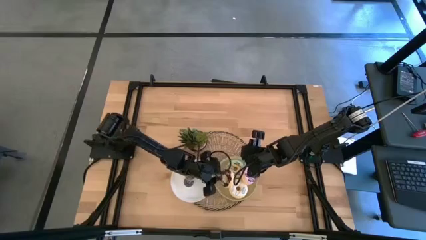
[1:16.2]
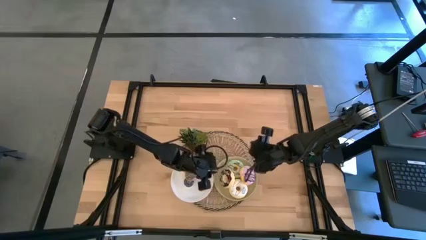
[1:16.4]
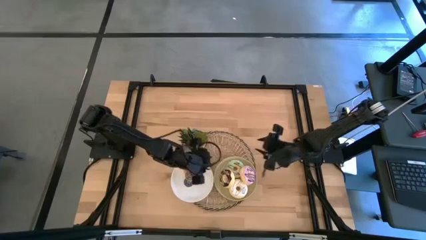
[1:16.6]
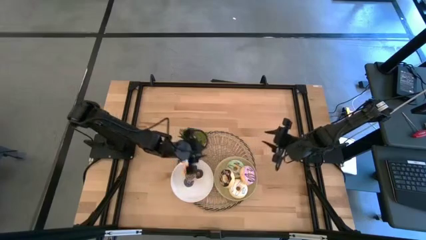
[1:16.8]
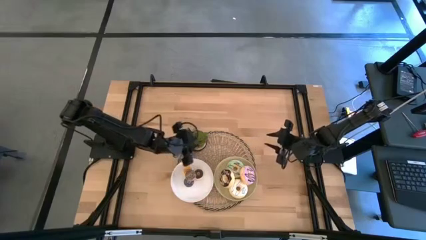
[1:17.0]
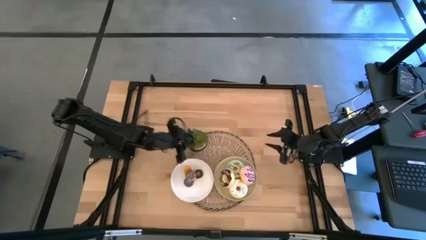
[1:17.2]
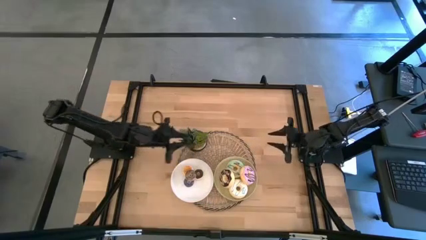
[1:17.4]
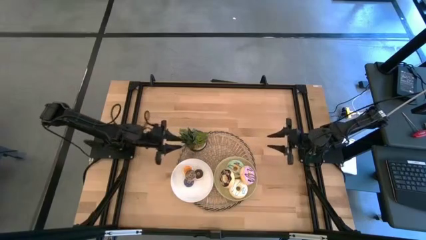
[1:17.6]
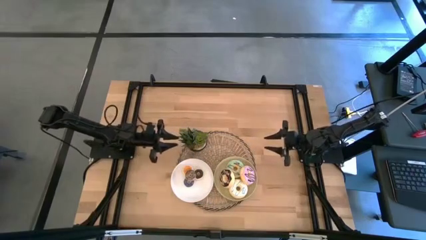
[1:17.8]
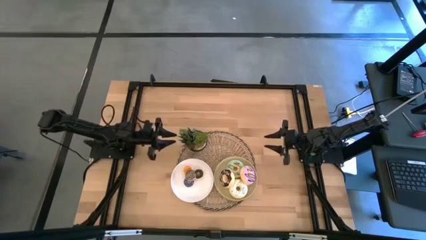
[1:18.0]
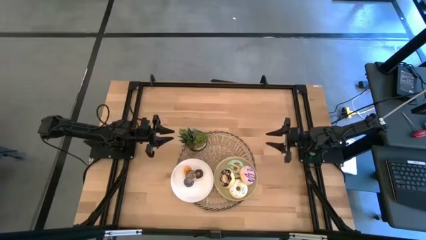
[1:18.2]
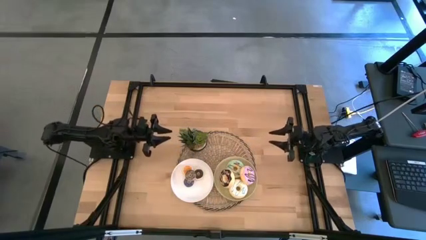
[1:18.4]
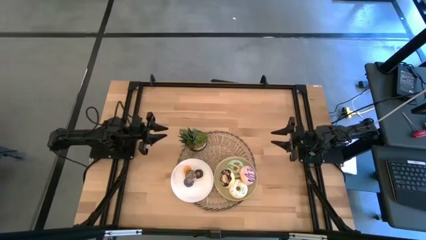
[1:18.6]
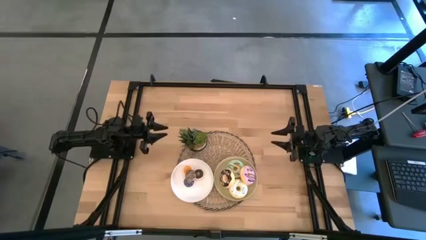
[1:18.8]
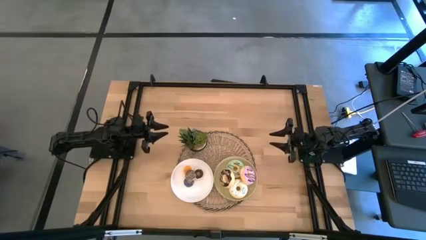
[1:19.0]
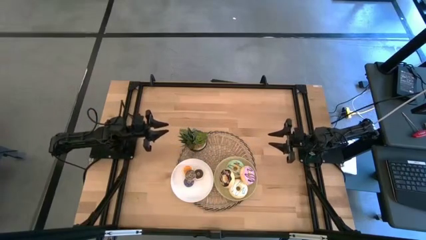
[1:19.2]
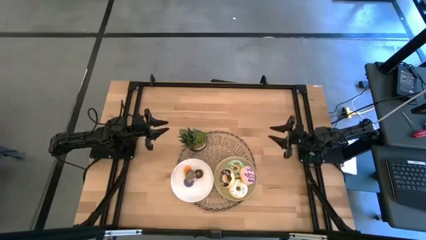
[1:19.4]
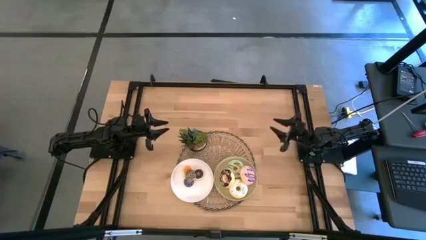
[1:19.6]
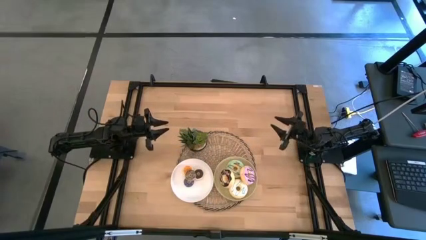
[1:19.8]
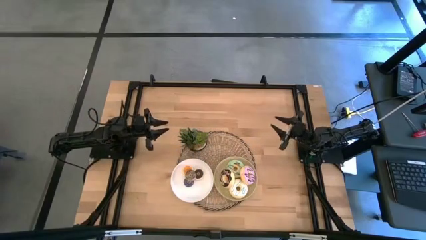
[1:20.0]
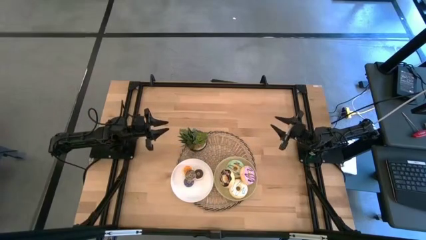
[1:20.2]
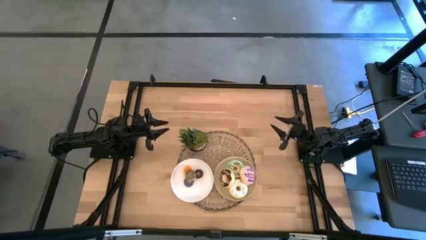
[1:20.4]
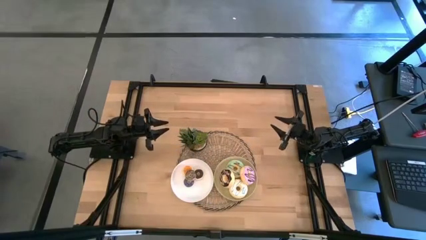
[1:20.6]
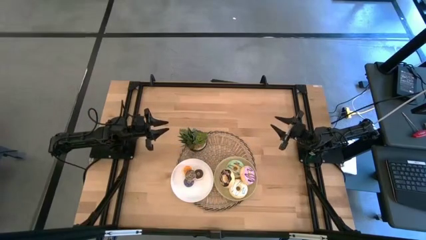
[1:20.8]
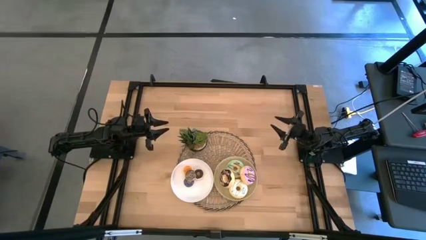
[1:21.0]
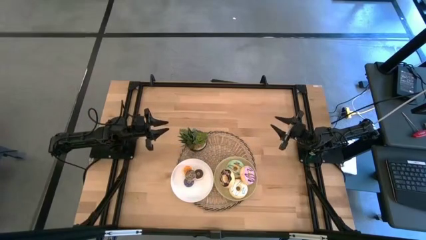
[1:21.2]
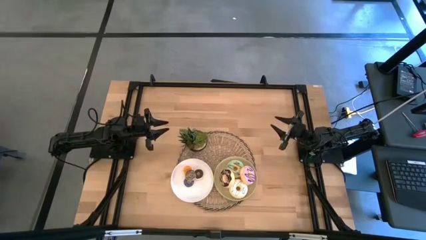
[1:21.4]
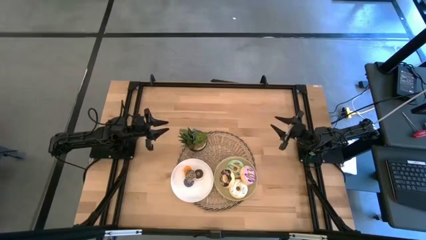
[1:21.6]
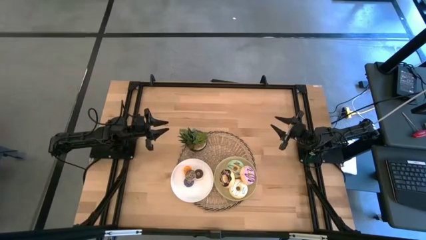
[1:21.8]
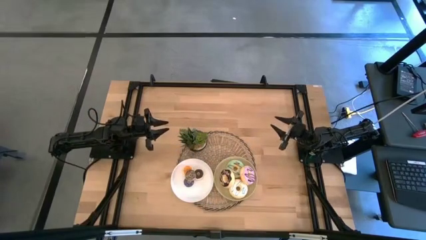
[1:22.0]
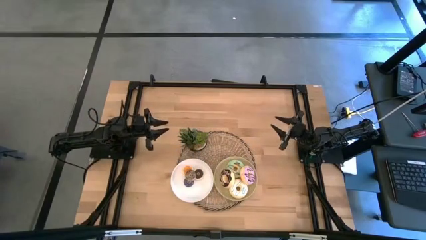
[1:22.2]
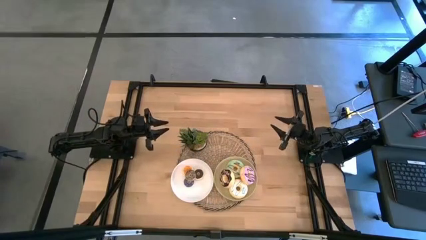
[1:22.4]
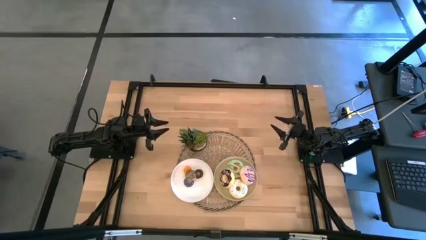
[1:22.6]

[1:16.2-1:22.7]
Task: Pick & Place donuts
Return to Home Position

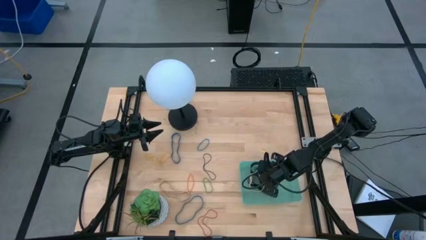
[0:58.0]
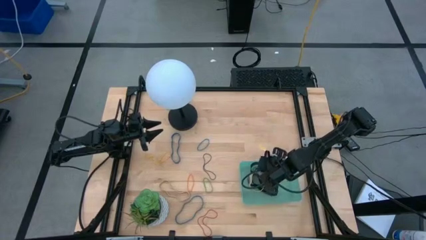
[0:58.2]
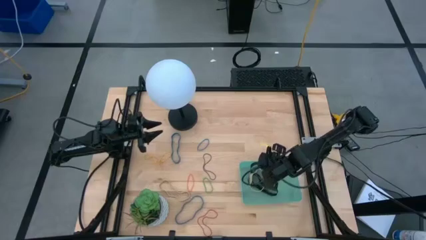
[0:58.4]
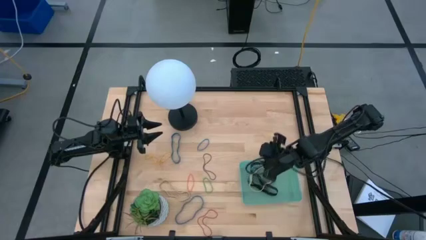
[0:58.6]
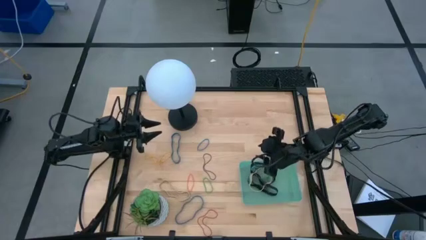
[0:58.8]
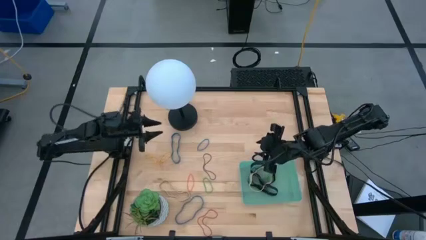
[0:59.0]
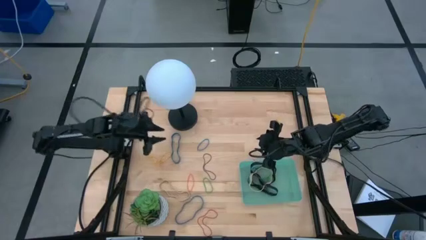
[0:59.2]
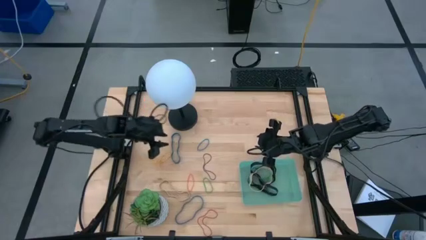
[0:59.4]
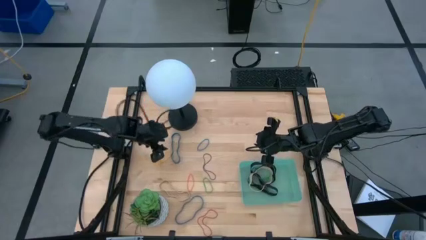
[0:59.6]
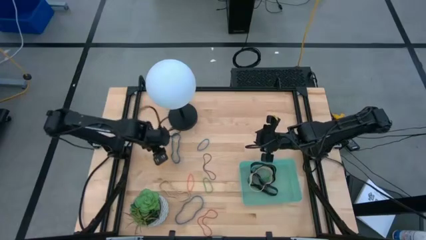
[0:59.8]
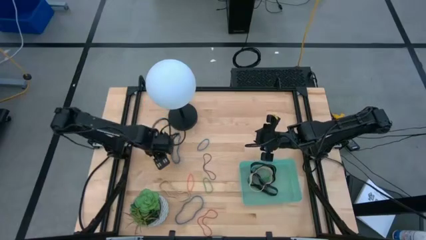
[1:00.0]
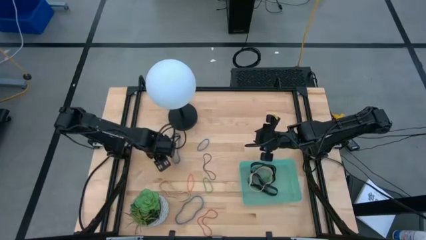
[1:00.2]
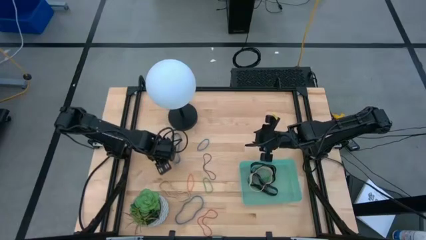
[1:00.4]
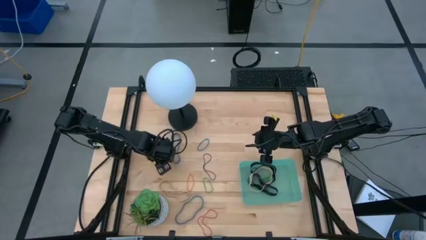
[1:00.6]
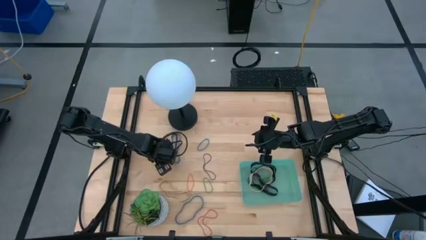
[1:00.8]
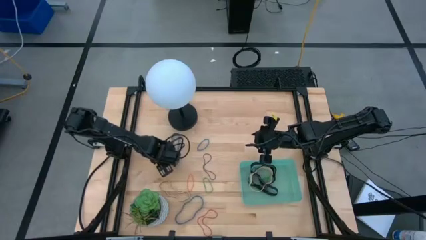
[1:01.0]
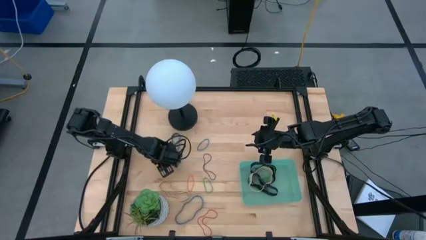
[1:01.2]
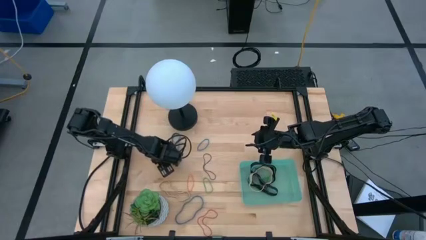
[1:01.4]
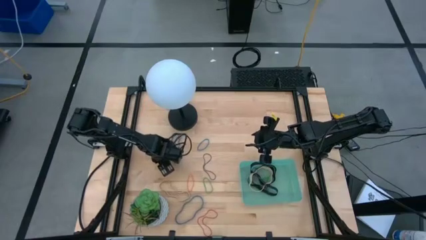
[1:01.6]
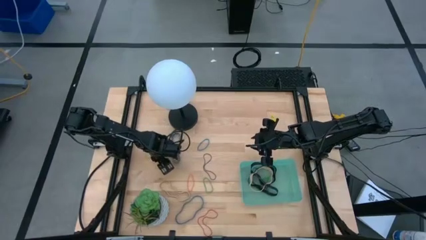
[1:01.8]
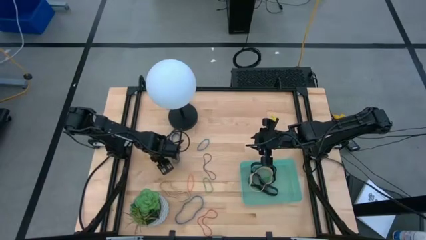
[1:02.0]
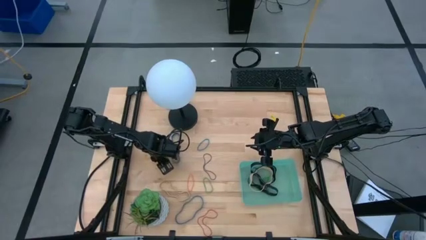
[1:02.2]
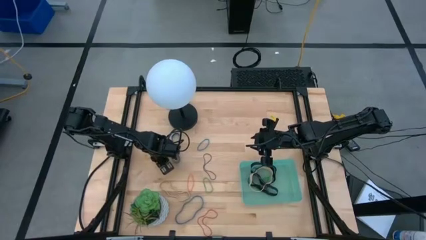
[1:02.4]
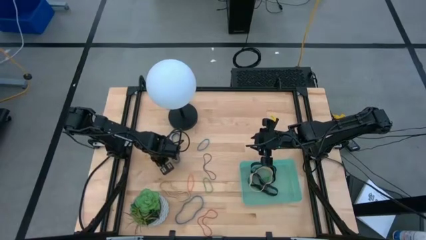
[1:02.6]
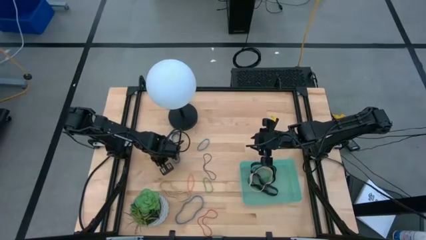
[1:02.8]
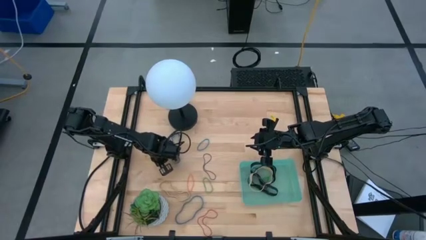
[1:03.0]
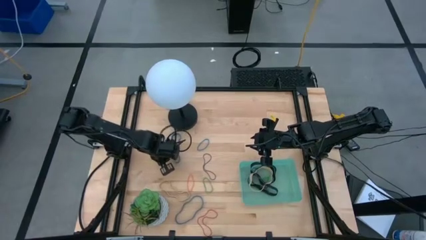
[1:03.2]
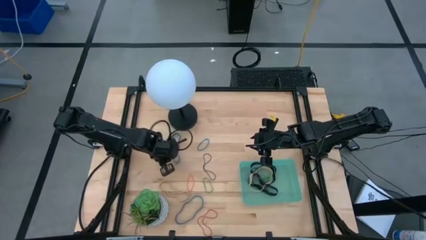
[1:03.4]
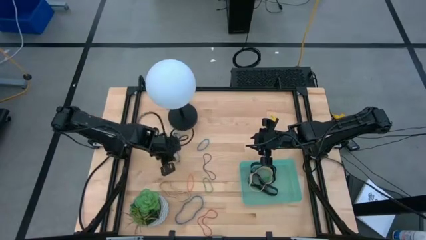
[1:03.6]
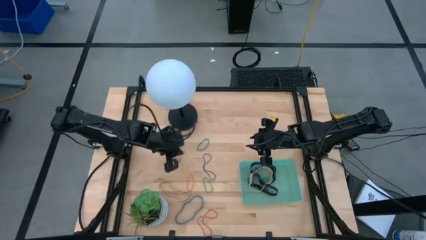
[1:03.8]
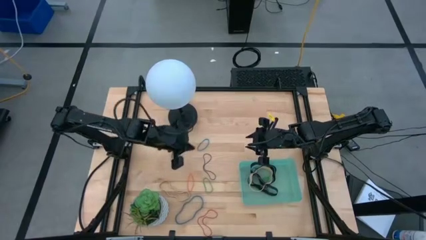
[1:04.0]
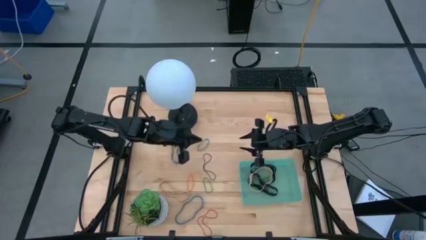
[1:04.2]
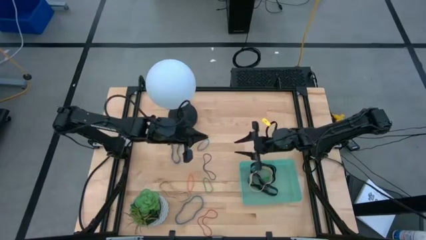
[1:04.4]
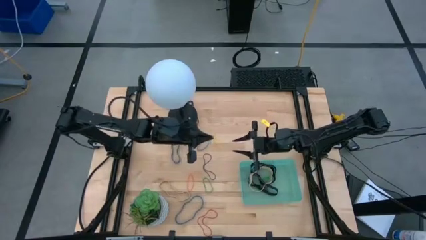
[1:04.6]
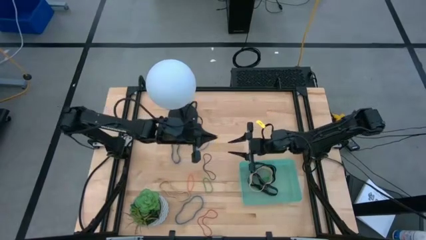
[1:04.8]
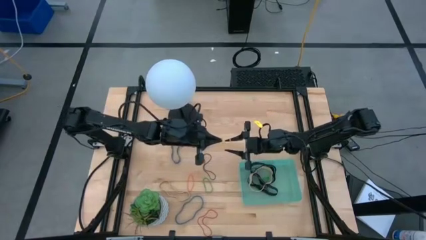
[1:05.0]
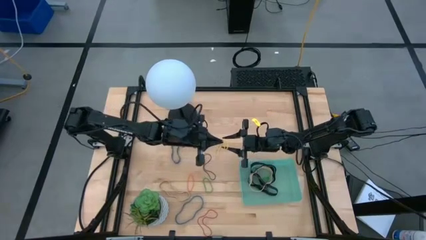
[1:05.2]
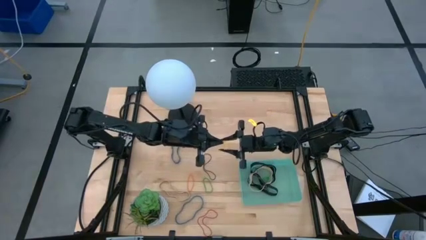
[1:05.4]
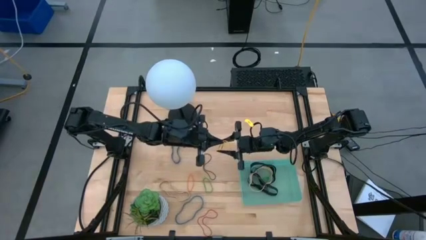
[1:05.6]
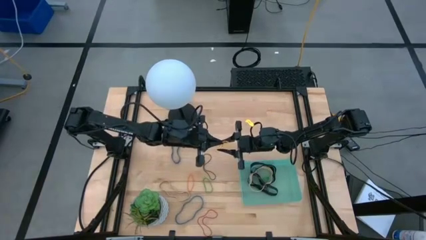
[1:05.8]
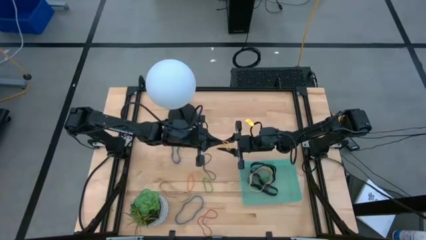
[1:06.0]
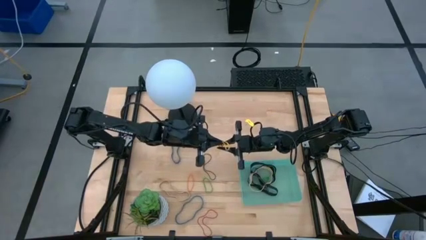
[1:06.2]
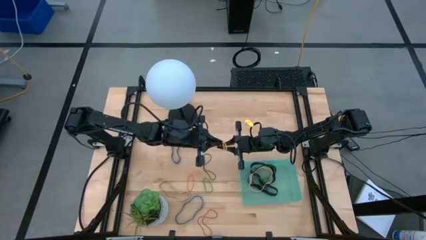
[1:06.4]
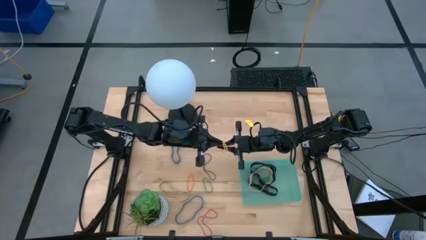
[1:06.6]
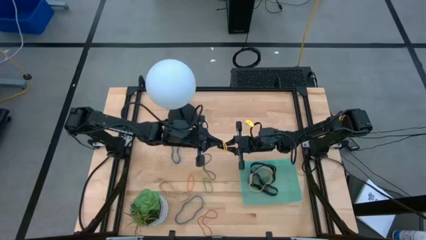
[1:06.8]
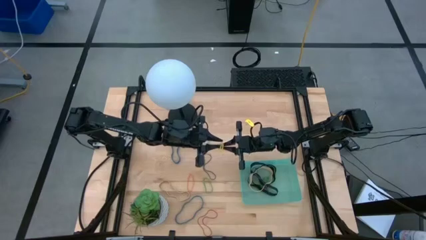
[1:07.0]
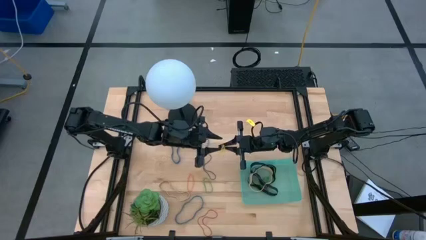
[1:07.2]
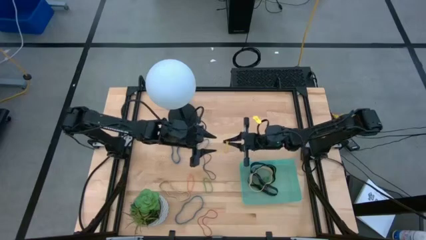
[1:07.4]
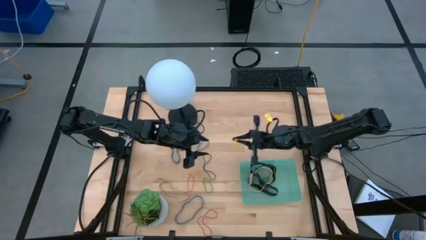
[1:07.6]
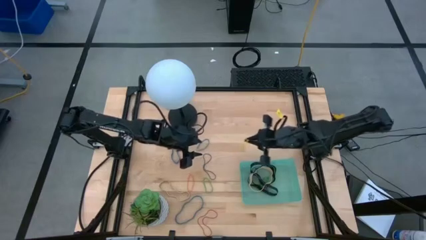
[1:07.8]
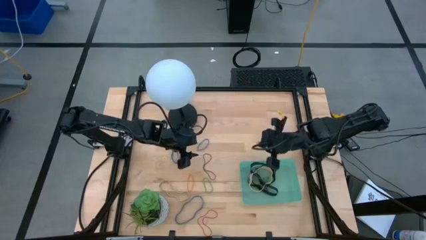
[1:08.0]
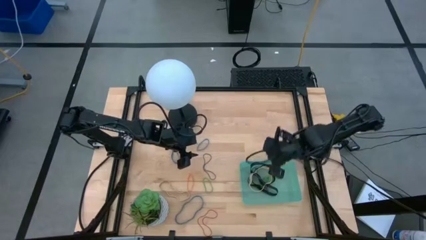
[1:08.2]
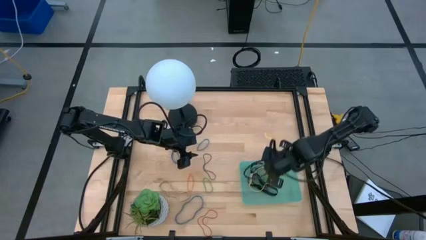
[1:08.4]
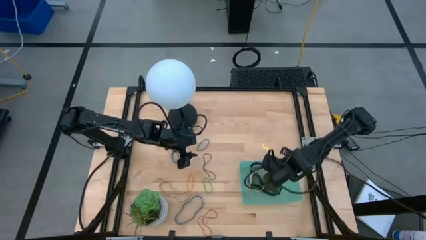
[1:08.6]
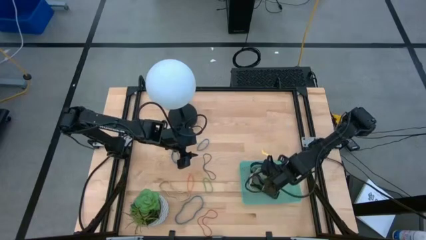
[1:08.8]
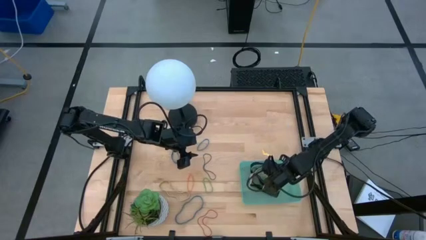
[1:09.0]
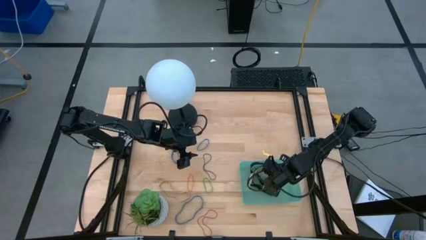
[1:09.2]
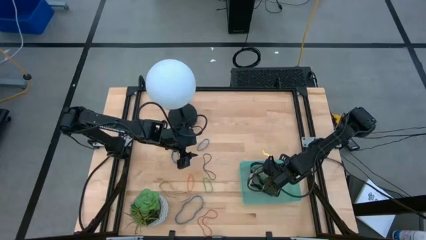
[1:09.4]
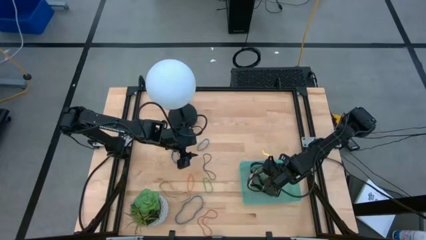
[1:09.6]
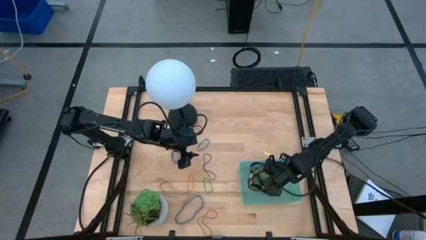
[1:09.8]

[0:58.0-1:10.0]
Task: Pick and place rubber bands into bin
Put the yellow rubber band into the green bin
